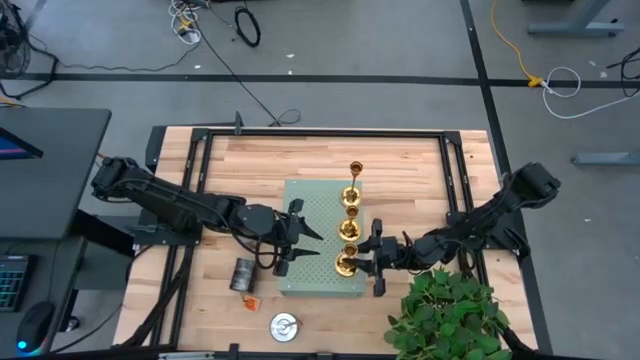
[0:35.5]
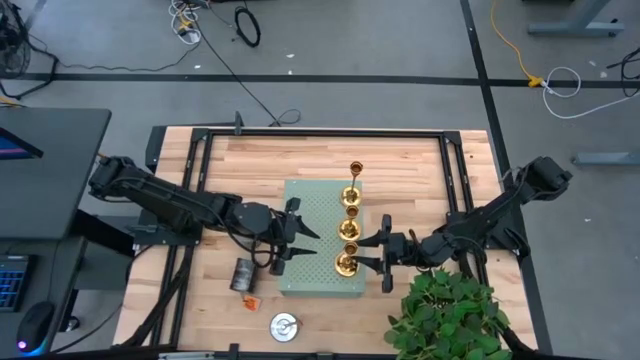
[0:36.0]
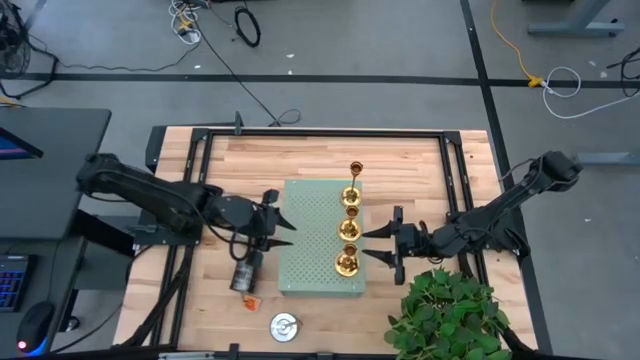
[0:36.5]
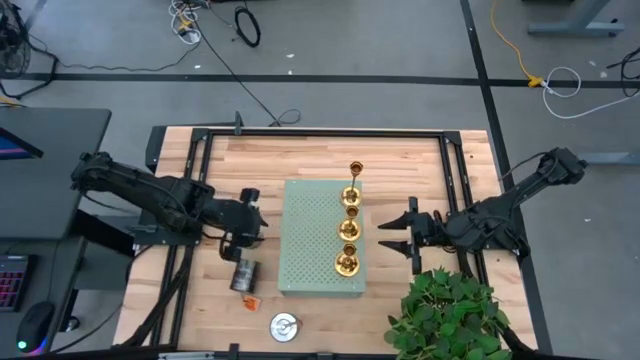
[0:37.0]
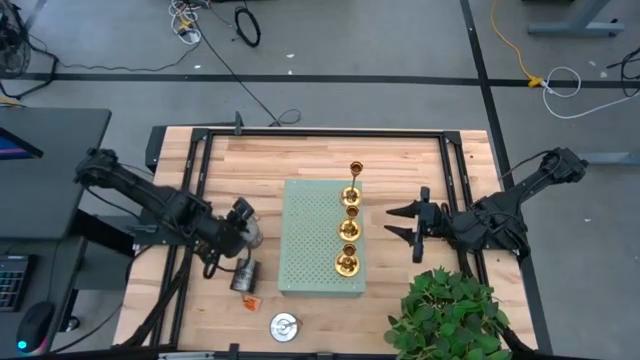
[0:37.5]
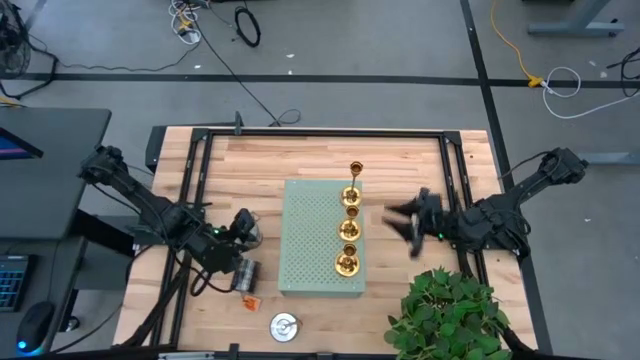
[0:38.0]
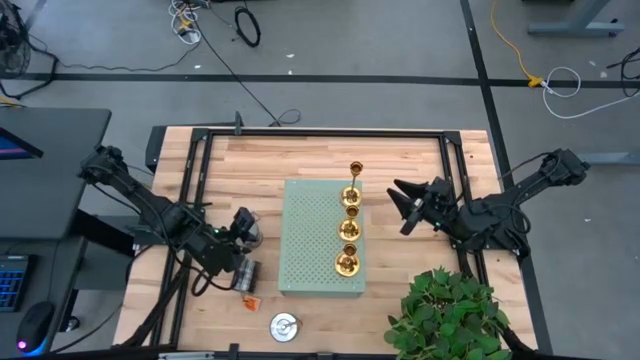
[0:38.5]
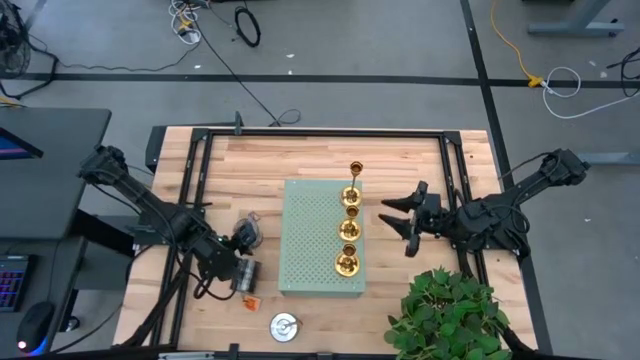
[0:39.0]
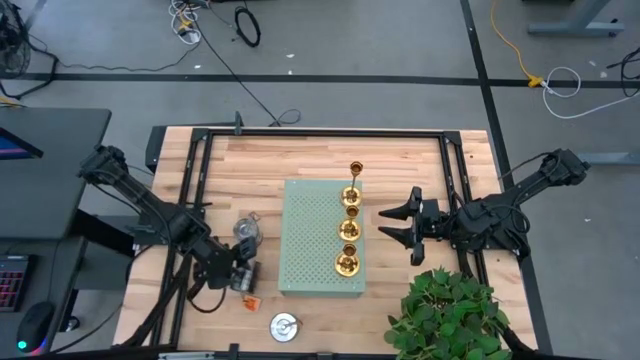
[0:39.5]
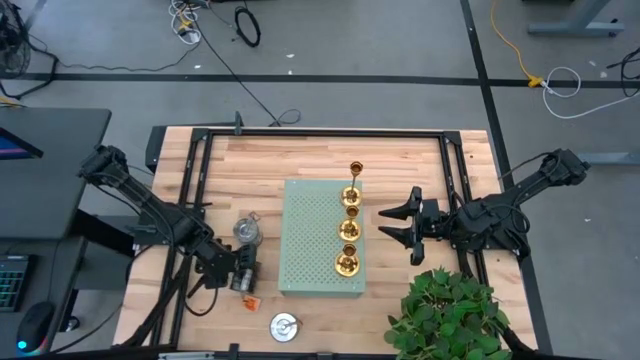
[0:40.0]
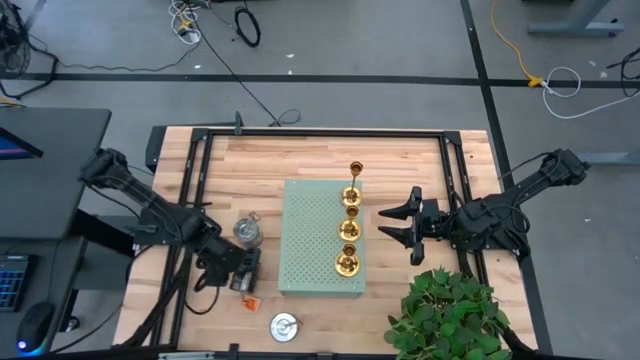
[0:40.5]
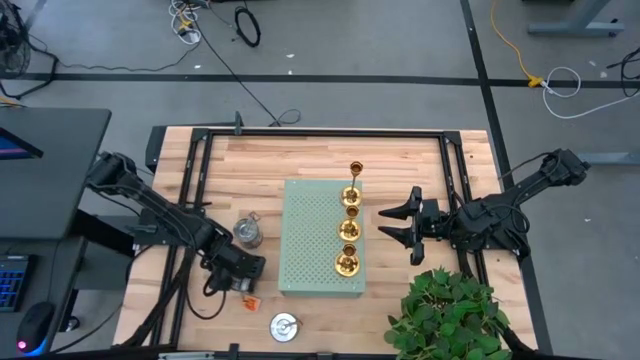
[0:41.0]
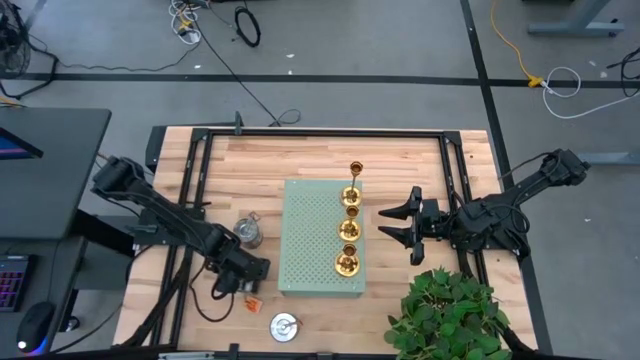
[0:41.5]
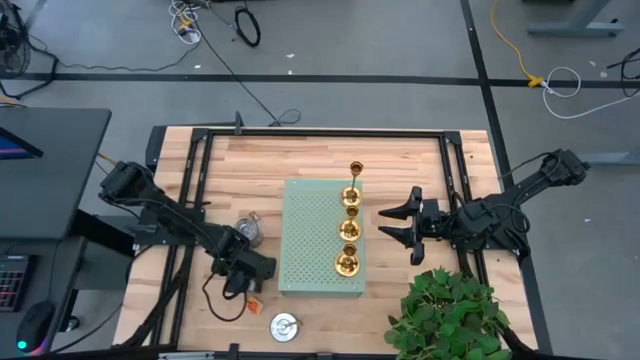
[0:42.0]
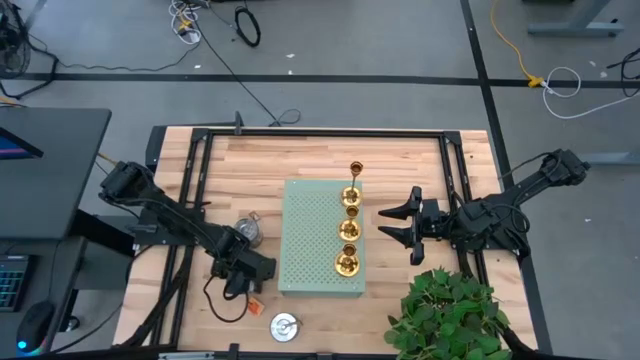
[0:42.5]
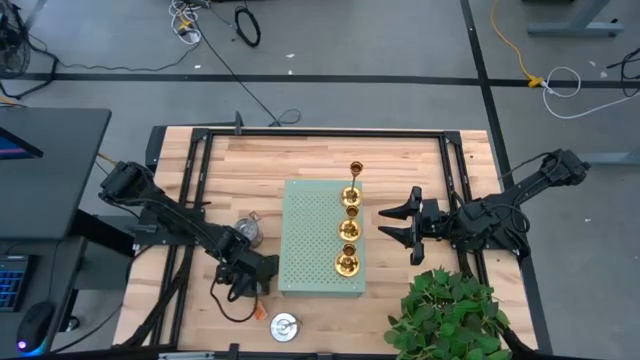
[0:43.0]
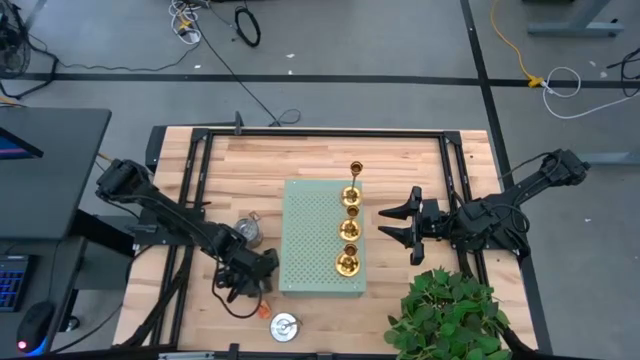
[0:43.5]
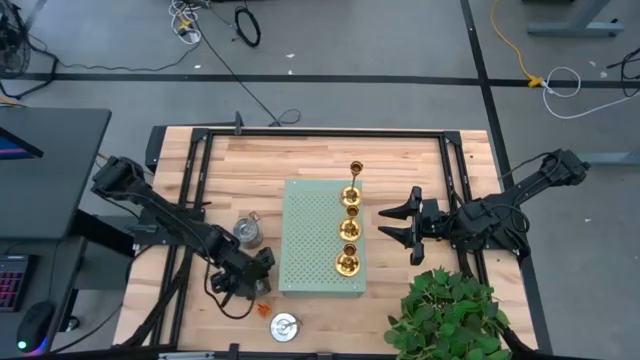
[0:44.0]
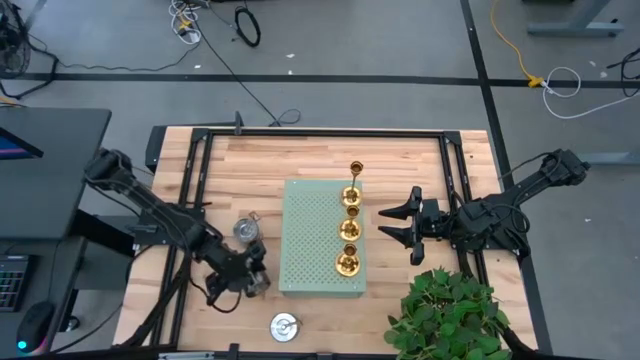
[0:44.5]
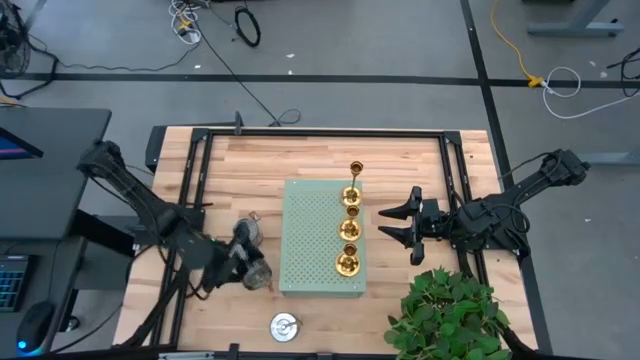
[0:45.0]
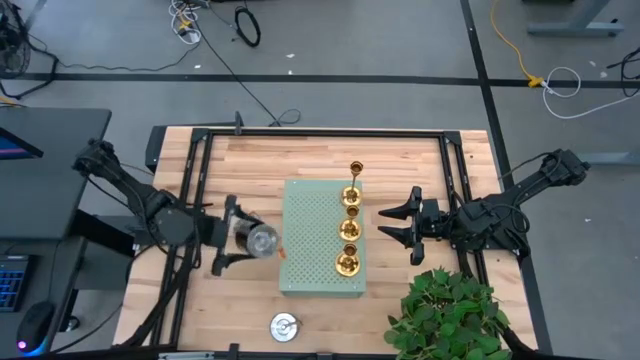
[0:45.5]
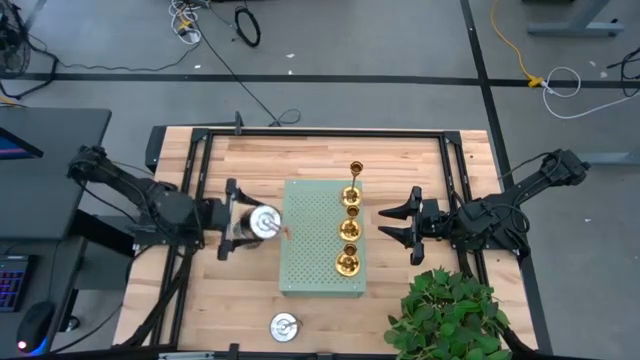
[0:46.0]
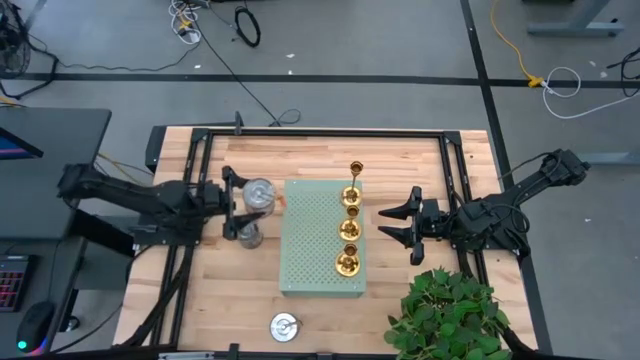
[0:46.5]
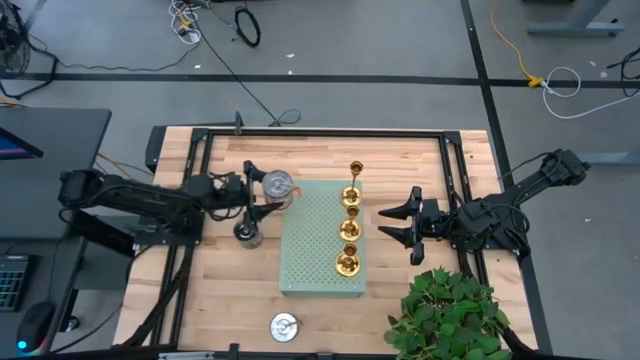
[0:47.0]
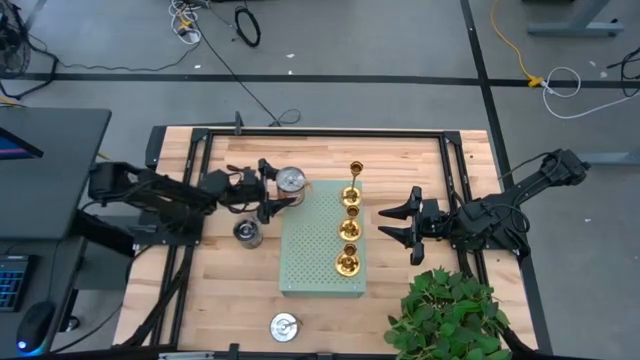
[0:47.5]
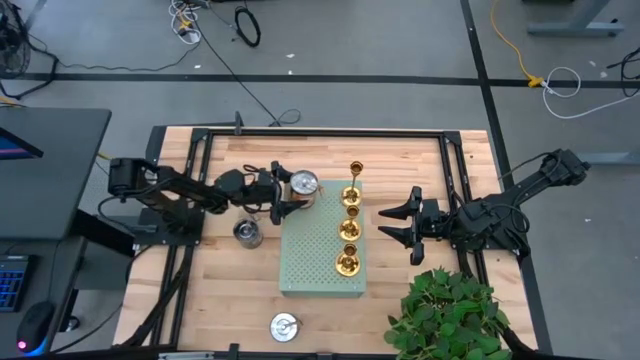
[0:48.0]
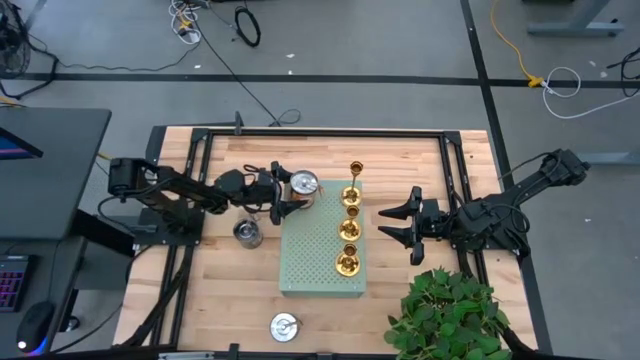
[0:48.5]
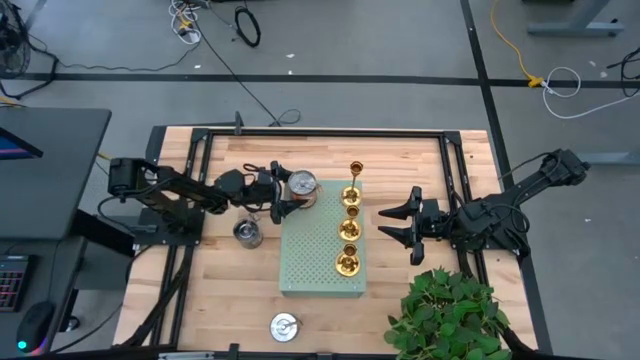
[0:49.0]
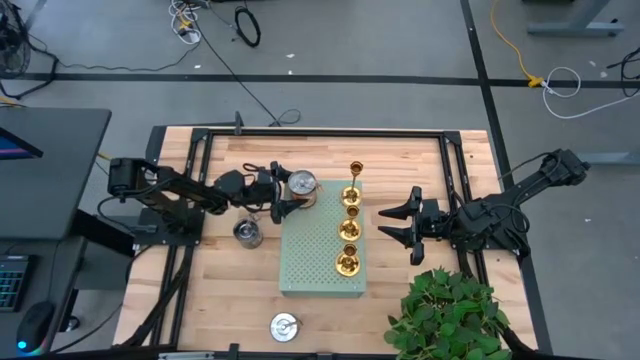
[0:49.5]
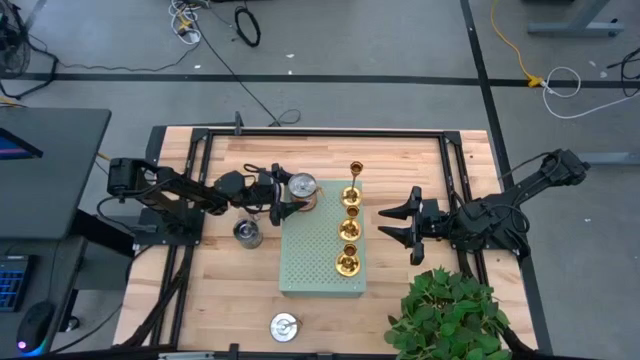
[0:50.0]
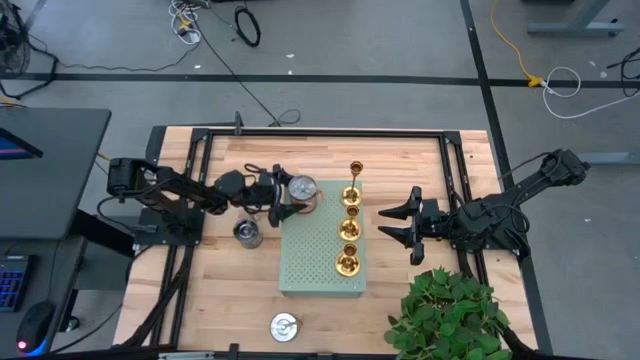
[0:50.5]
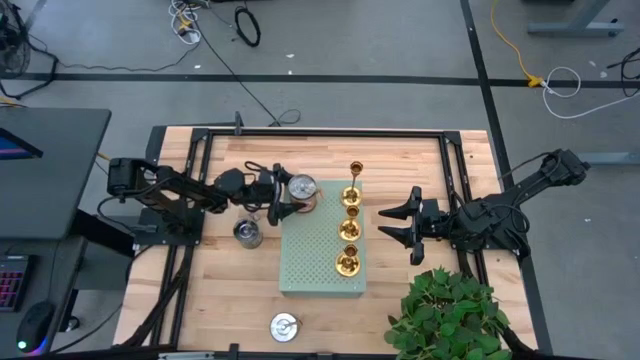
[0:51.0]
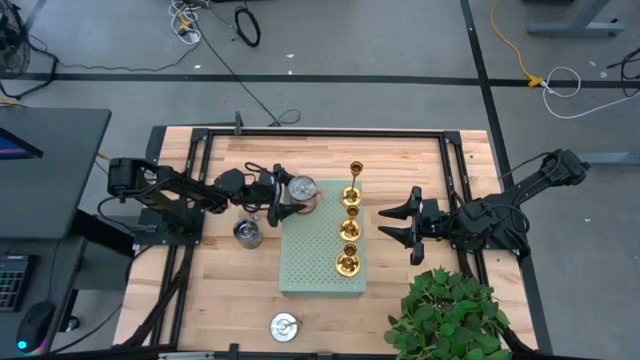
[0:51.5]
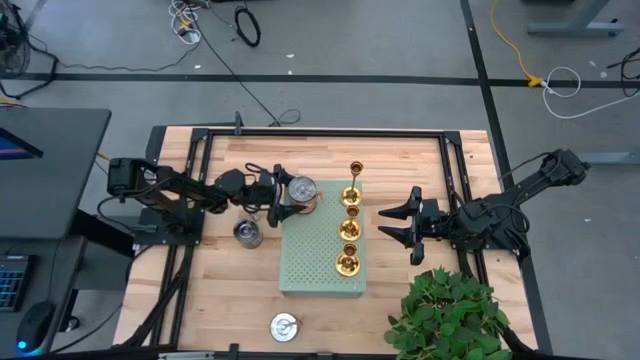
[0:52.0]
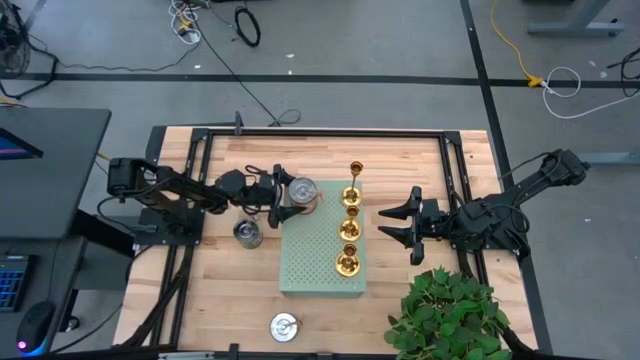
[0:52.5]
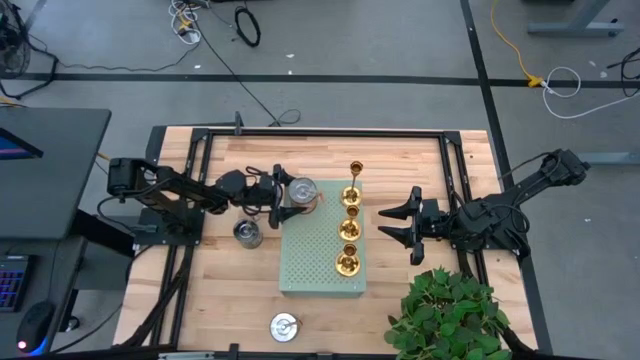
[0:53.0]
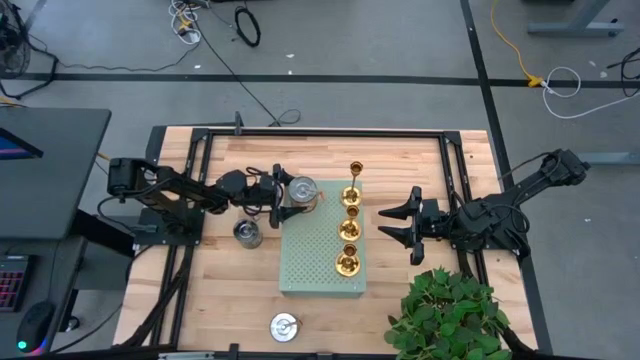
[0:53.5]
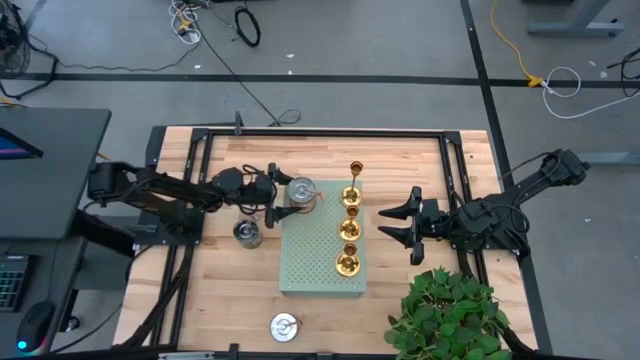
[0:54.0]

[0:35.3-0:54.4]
Task: Pick & Place candle stick holders
Put the top orange scented candle on the shelf
